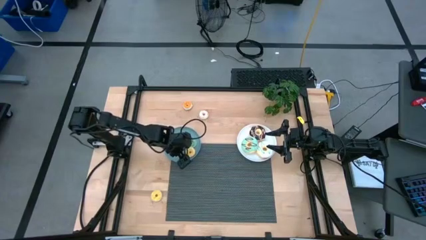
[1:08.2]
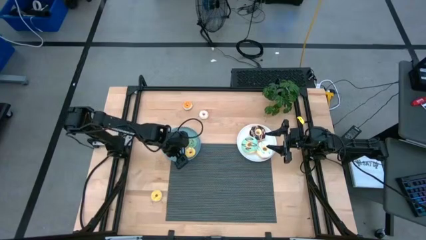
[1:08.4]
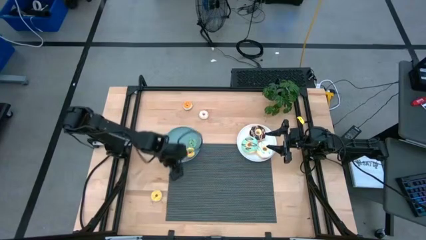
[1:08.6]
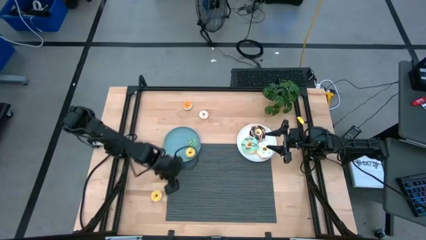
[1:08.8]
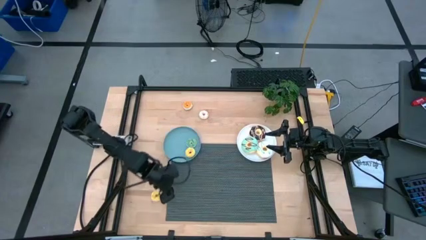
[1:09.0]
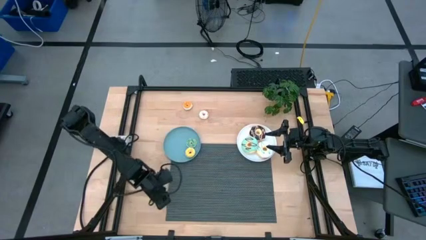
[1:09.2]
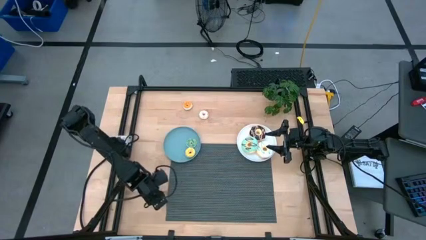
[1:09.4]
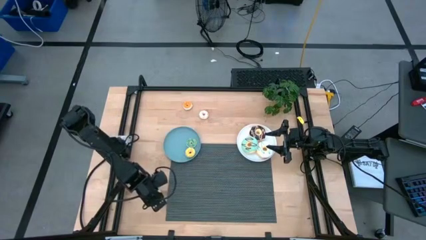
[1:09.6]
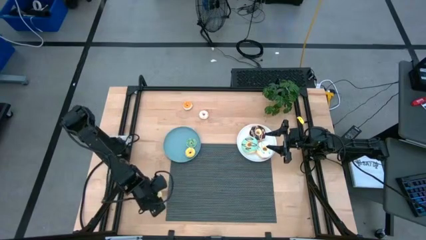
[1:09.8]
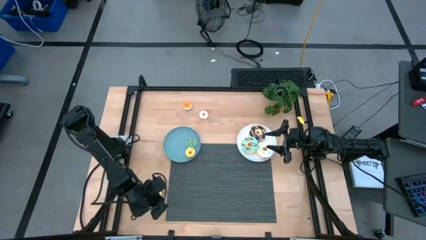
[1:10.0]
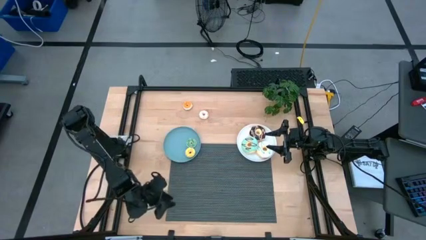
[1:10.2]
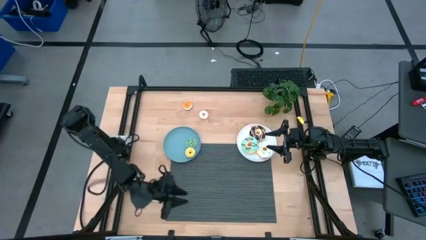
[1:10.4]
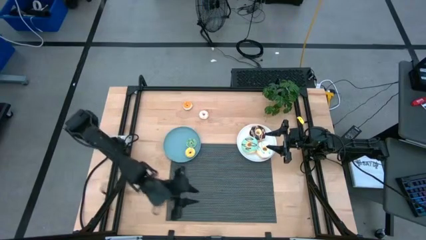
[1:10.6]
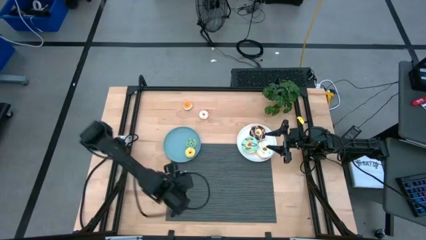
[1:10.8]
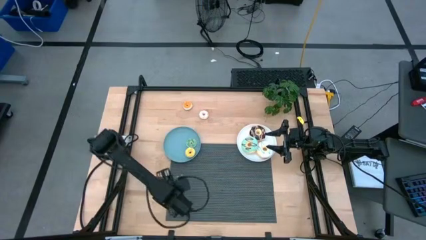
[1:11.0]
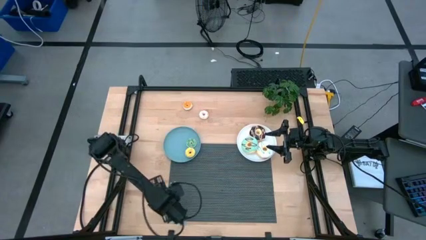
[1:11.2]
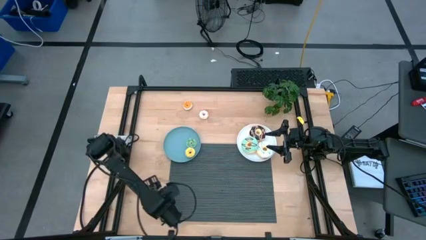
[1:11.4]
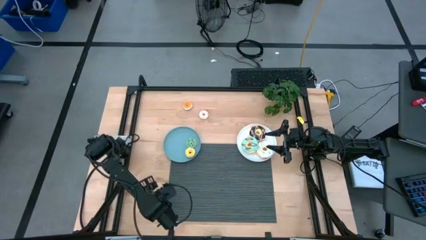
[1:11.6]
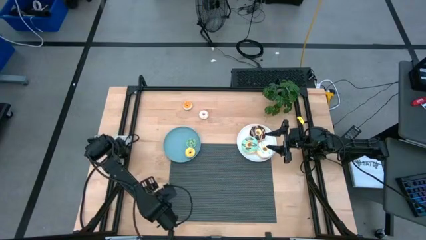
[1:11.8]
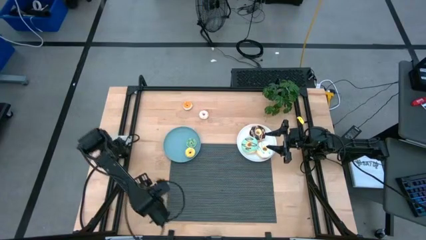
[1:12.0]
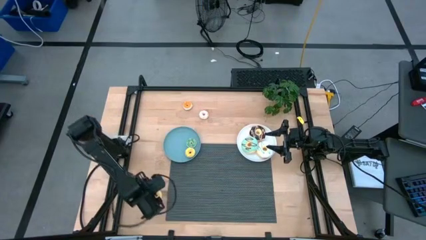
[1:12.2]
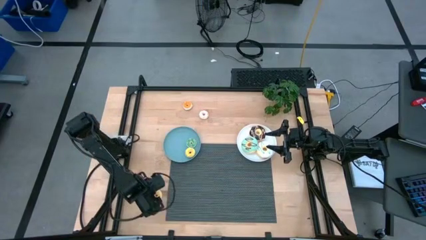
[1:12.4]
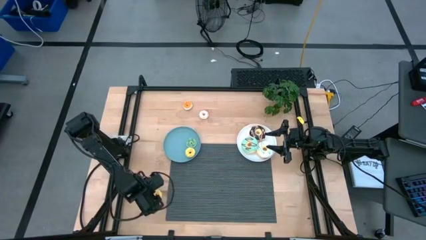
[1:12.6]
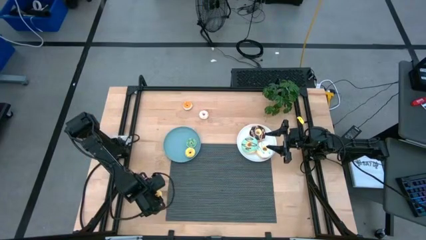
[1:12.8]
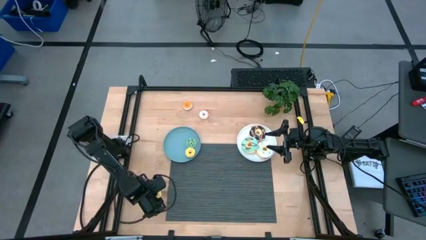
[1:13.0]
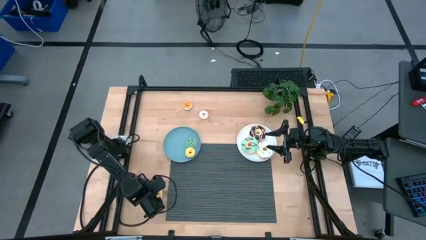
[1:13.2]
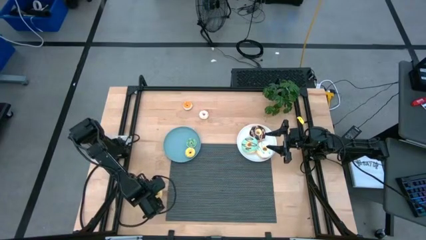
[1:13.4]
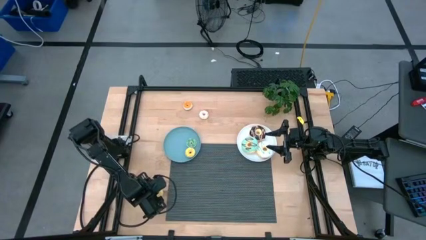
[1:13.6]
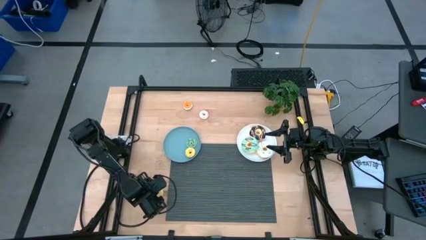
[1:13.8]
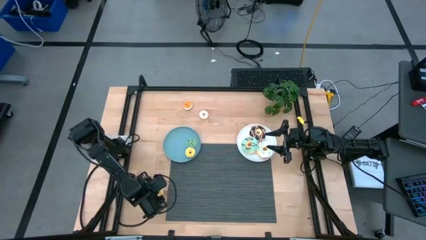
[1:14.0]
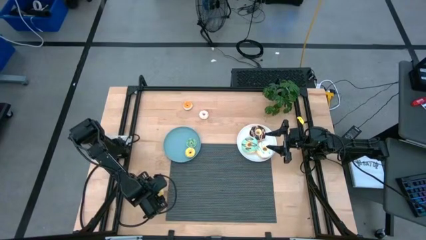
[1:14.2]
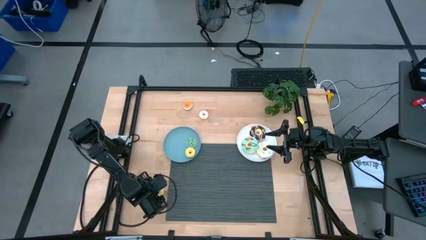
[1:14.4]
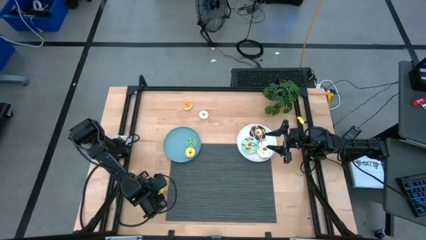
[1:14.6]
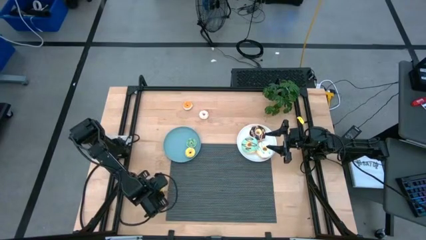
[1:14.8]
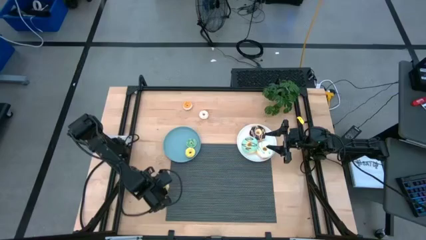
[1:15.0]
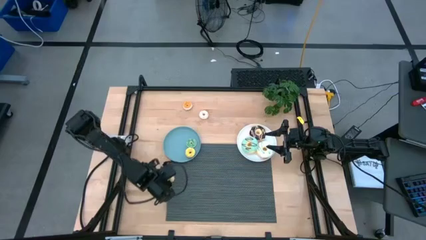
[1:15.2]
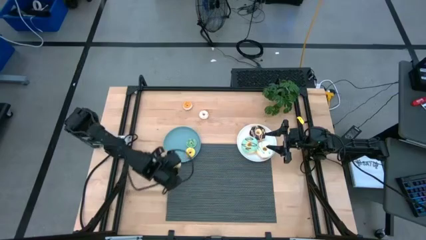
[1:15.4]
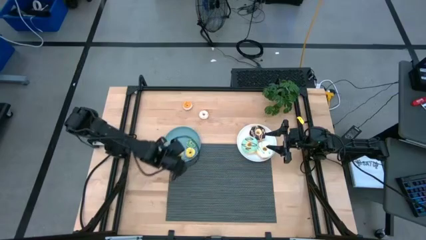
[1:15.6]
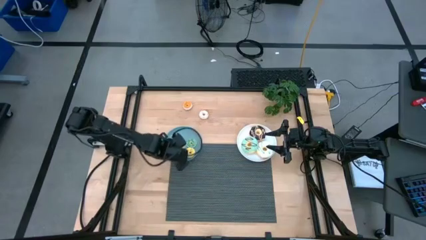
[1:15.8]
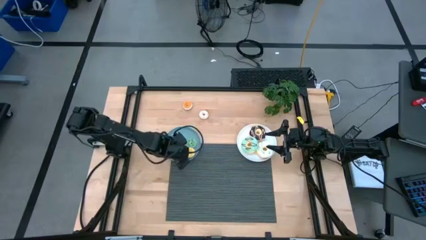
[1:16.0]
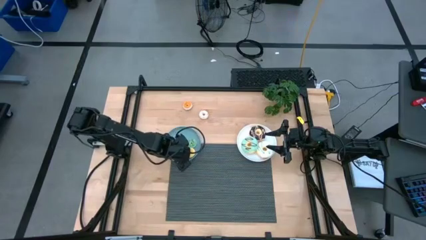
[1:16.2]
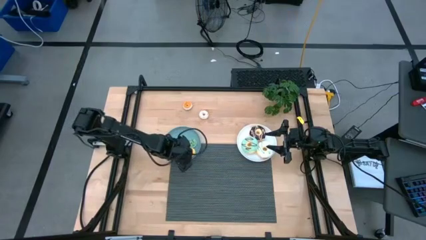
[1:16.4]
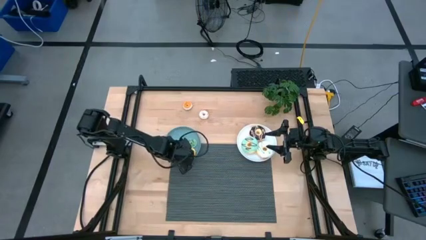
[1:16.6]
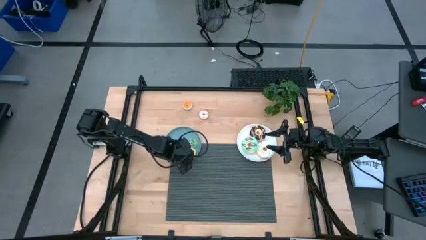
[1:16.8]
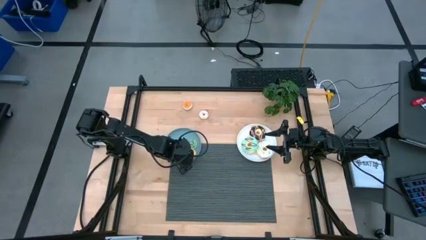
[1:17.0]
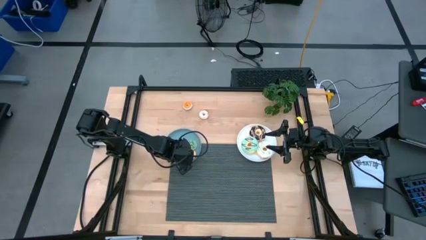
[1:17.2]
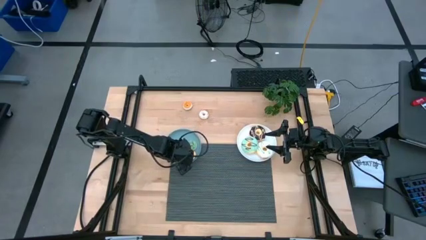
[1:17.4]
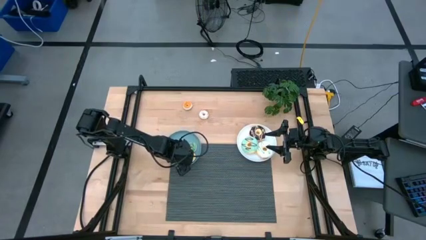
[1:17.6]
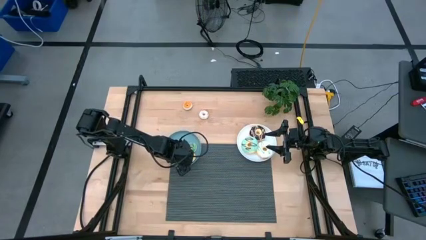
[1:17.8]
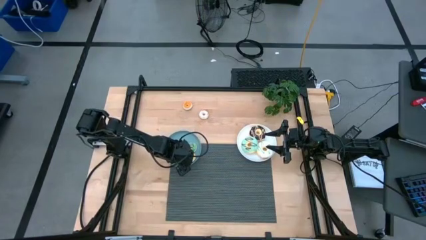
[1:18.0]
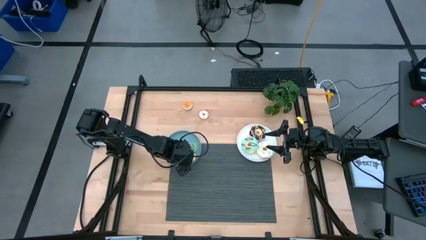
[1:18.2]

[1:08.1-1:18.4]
Task: Pick & Place donuts
Put the small yellow donut on the blue plate

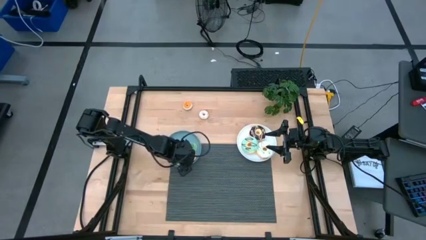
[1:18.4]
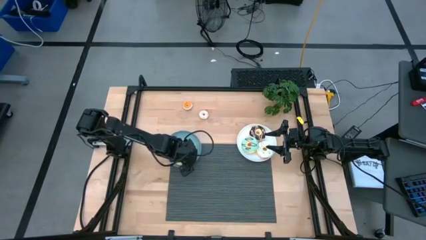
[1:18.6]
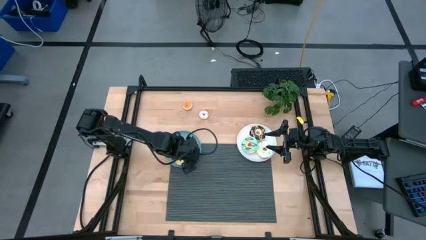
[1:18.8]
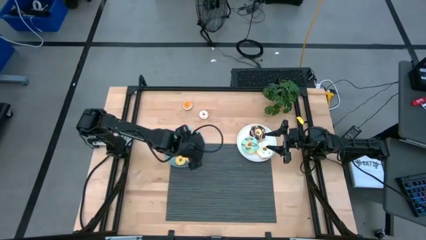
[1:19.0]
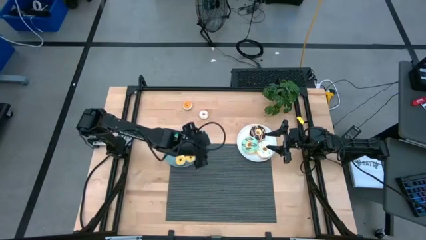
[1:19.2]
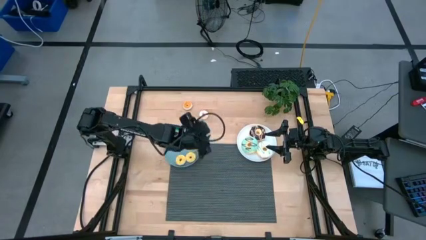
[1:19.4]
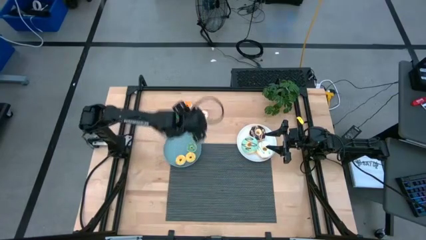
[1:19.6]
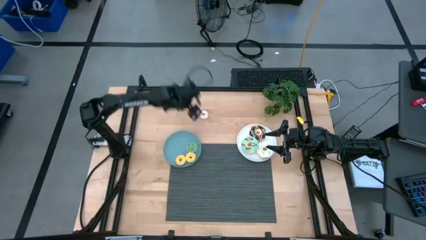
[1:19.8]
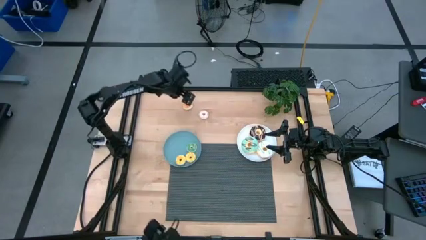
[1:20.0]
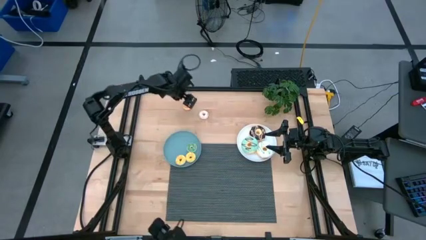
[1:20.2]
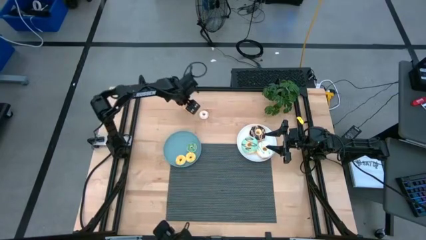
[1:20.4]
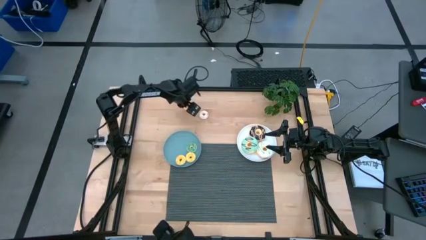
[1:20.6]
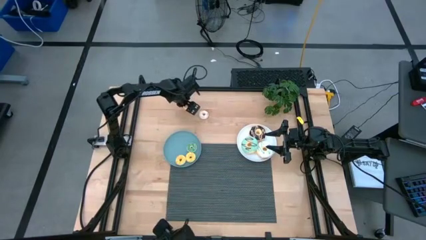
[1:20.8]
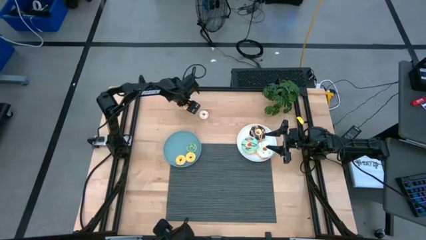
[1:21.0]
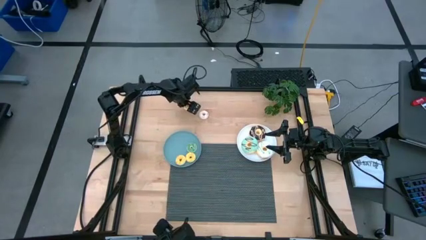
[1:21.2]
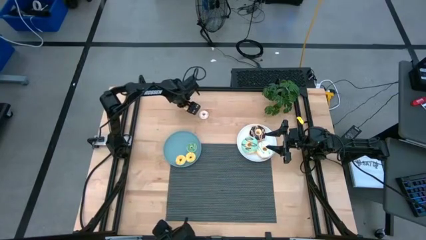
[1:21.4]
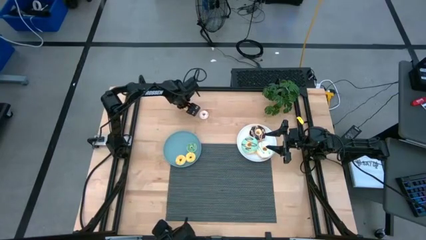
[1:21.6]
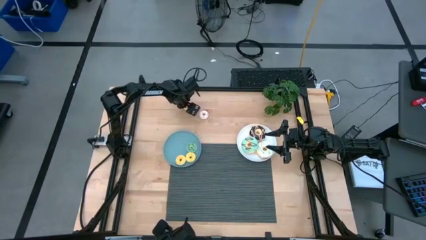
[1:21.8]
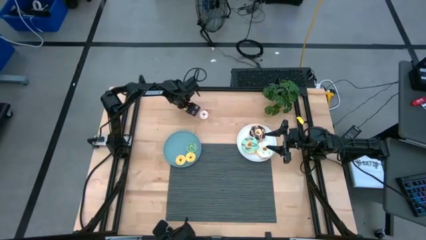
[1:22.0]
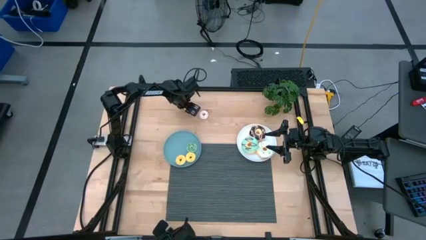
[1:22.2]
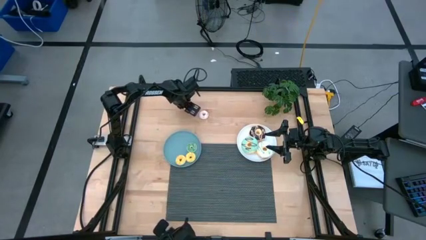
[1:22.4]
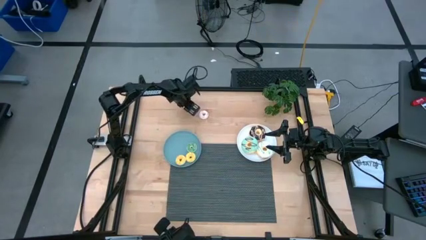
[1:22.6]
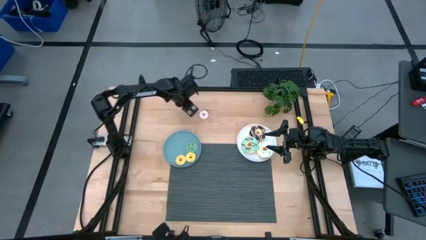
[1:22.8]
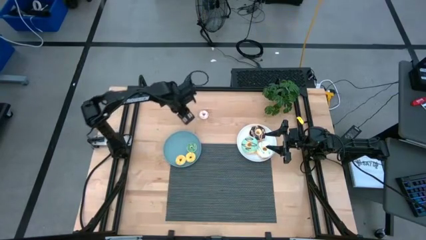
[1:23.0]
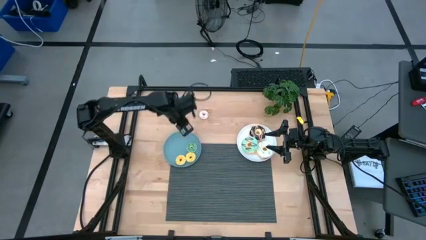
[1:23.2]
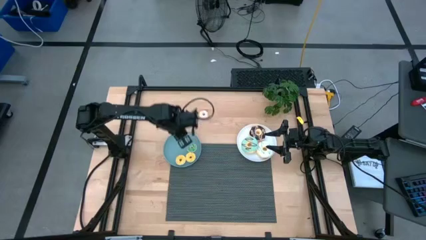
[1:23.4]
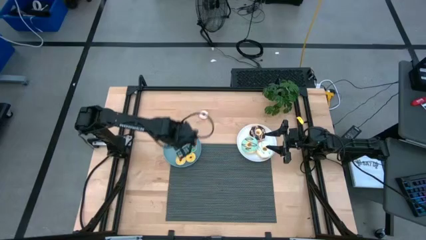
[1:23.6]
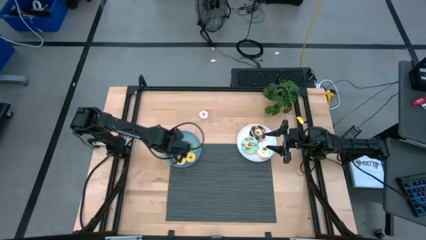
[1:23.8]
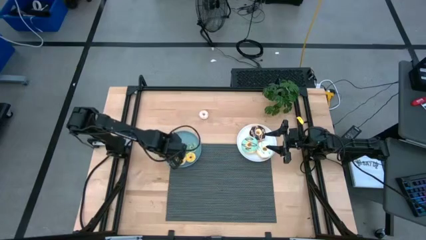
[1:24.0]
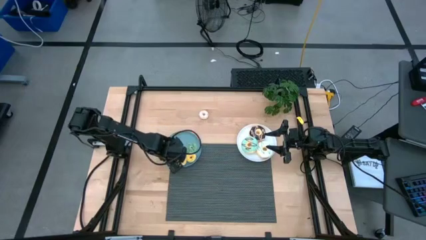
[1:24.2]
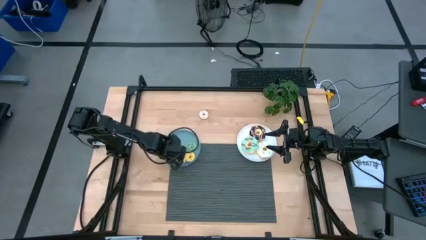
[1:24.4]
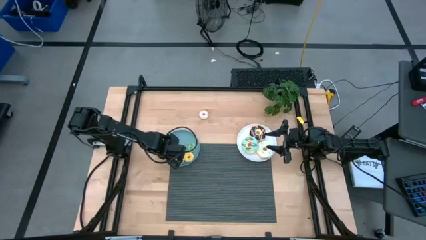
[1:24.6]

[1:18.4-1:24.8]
Put the small orange donut on the blue plate
